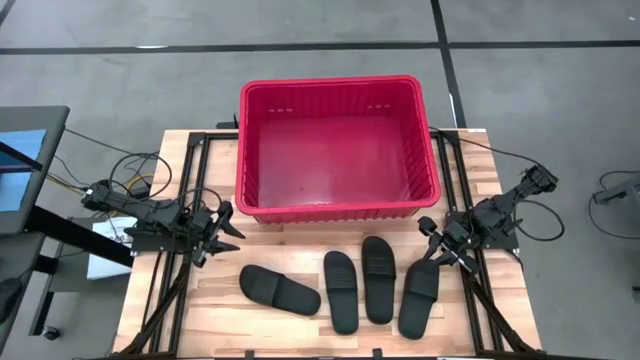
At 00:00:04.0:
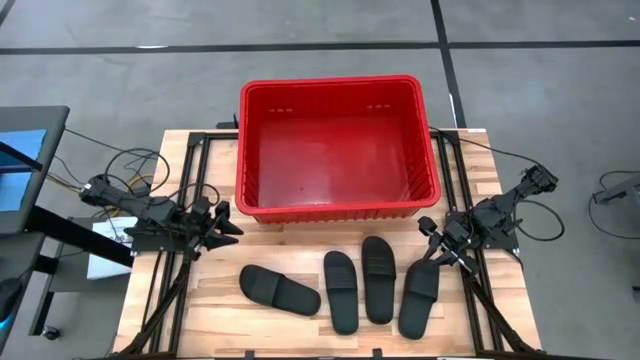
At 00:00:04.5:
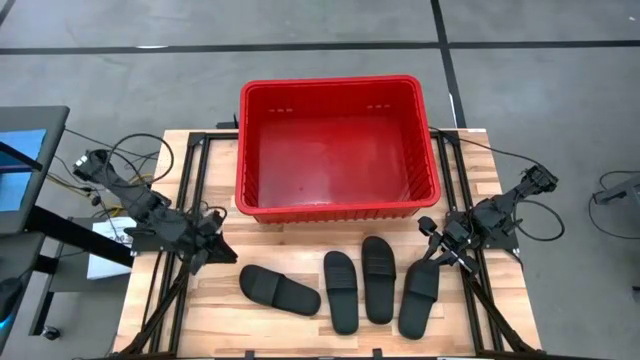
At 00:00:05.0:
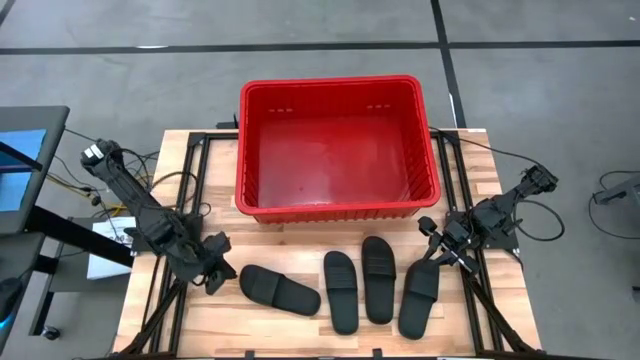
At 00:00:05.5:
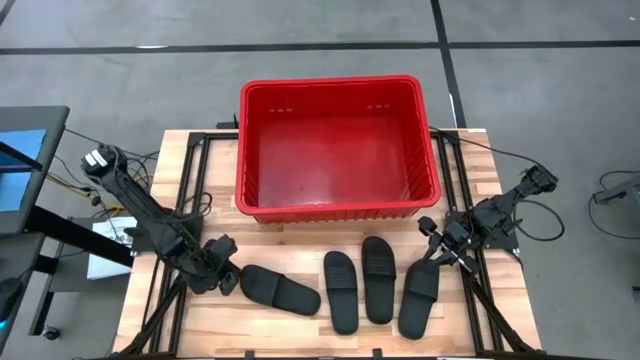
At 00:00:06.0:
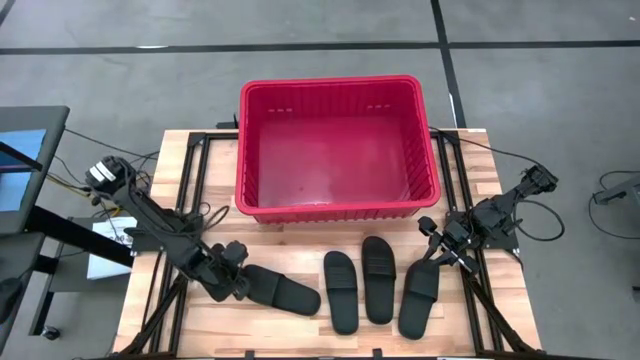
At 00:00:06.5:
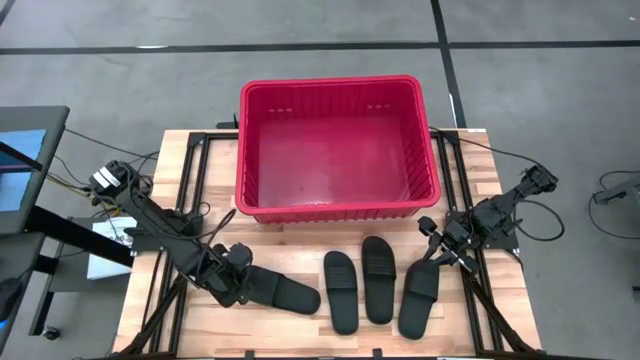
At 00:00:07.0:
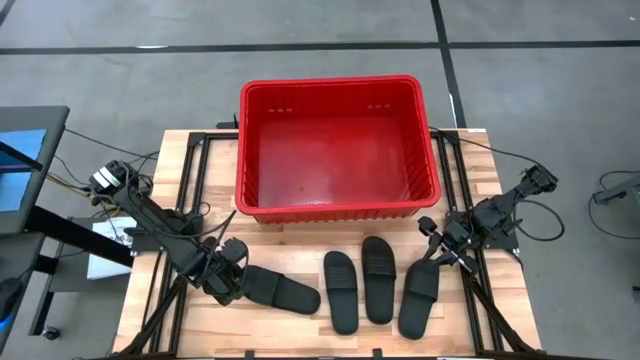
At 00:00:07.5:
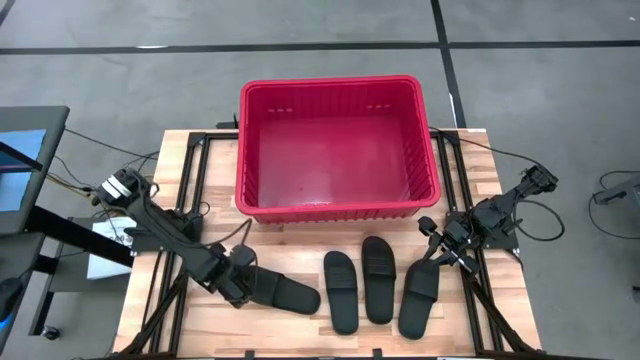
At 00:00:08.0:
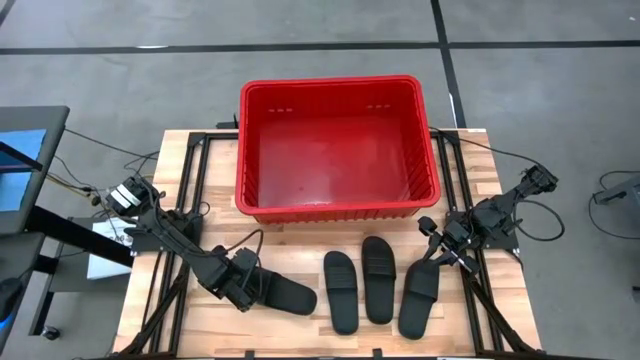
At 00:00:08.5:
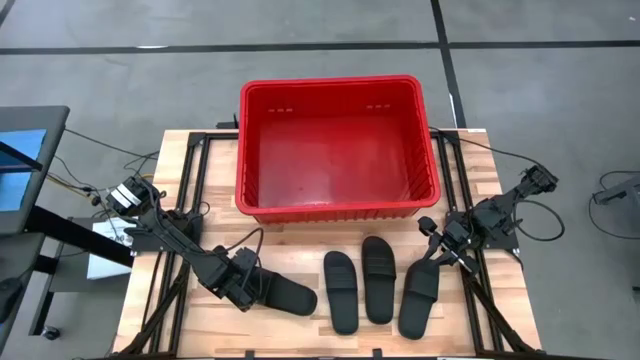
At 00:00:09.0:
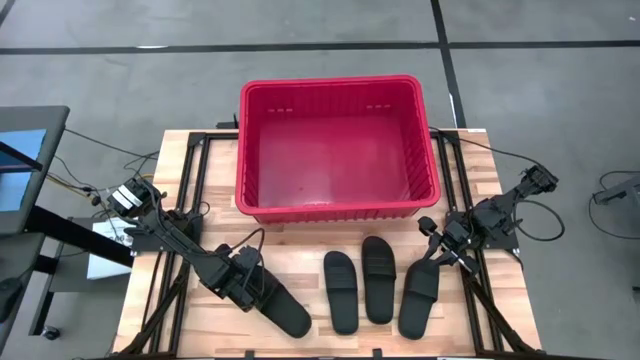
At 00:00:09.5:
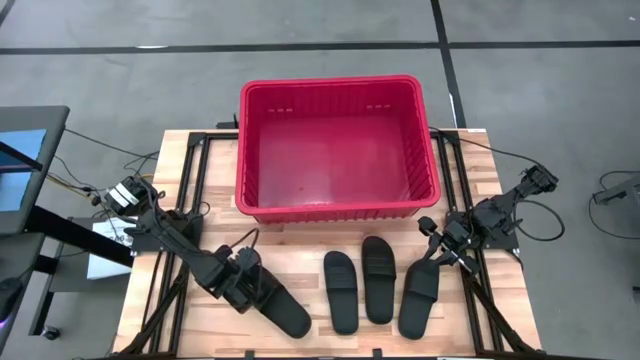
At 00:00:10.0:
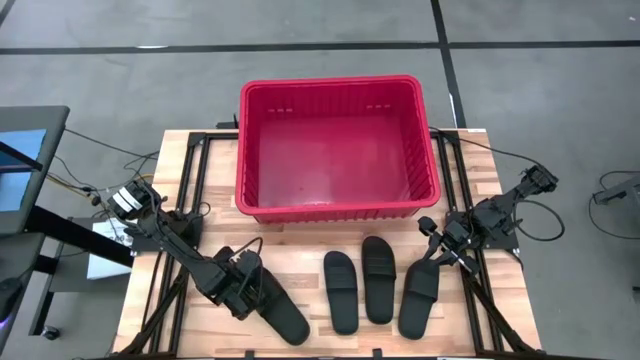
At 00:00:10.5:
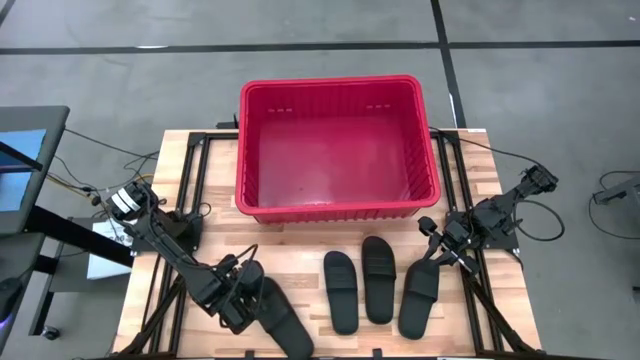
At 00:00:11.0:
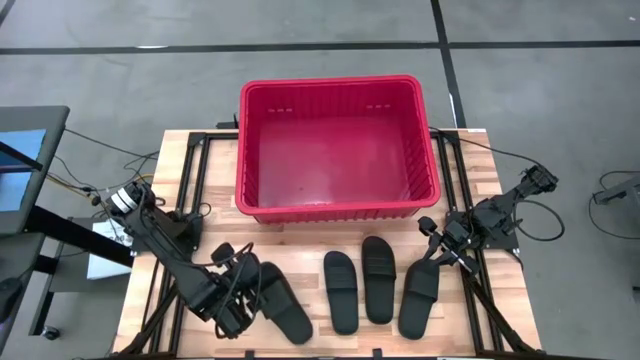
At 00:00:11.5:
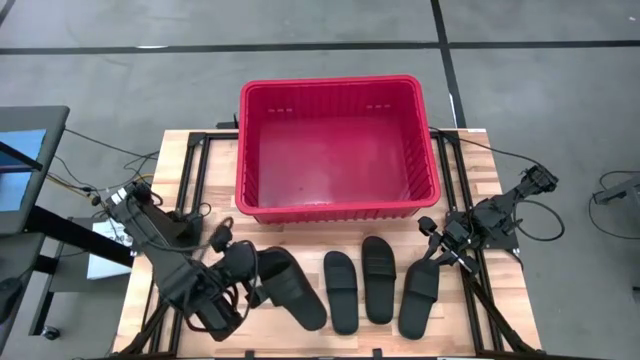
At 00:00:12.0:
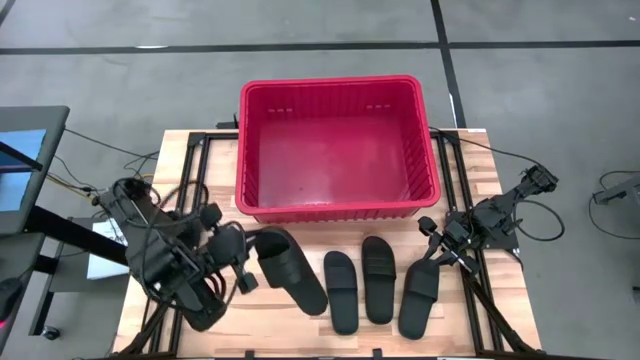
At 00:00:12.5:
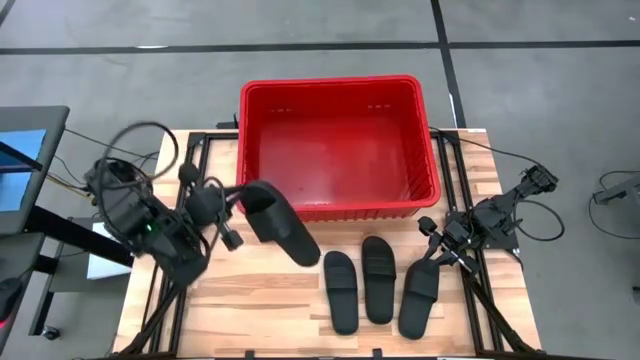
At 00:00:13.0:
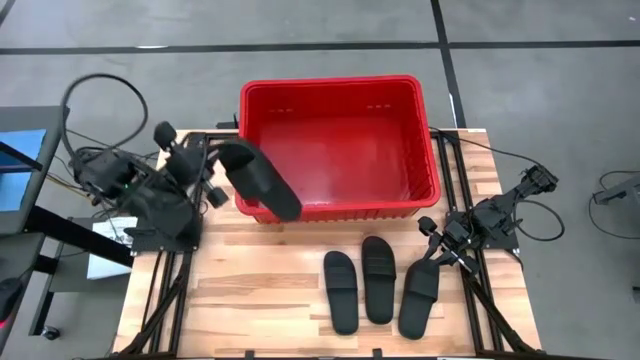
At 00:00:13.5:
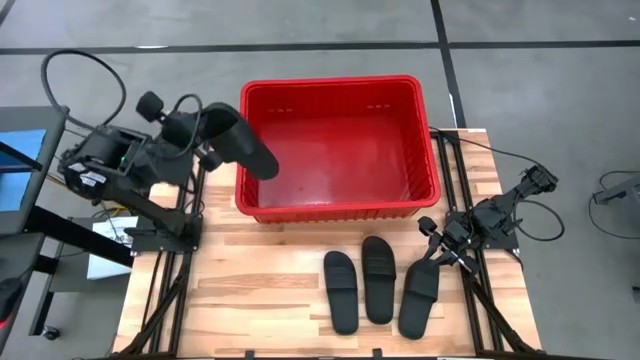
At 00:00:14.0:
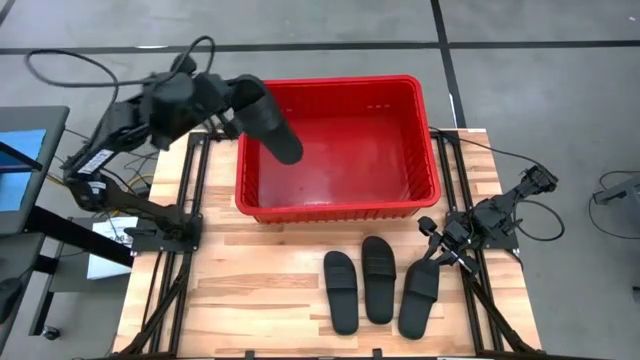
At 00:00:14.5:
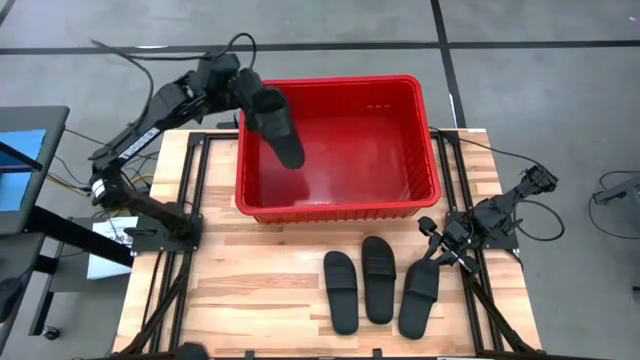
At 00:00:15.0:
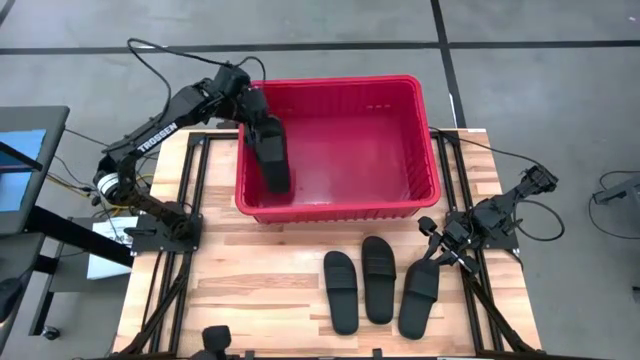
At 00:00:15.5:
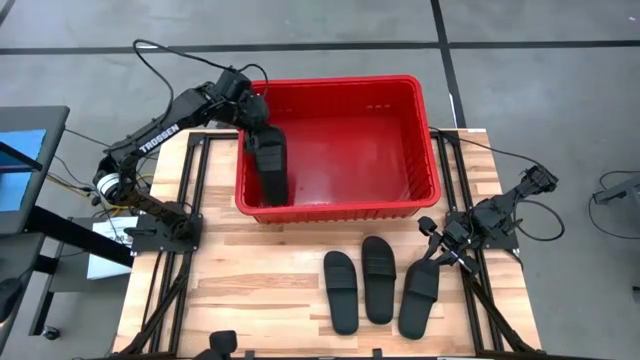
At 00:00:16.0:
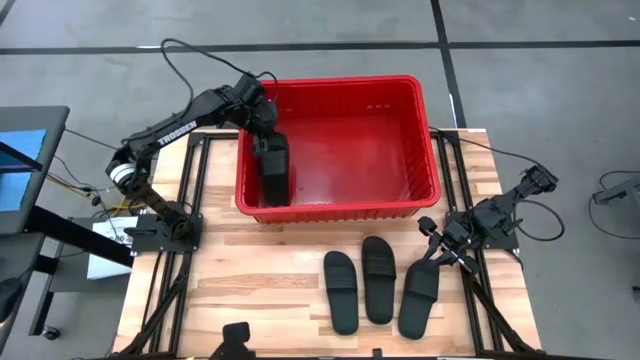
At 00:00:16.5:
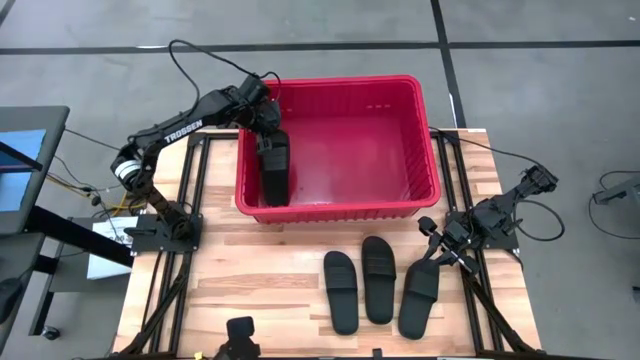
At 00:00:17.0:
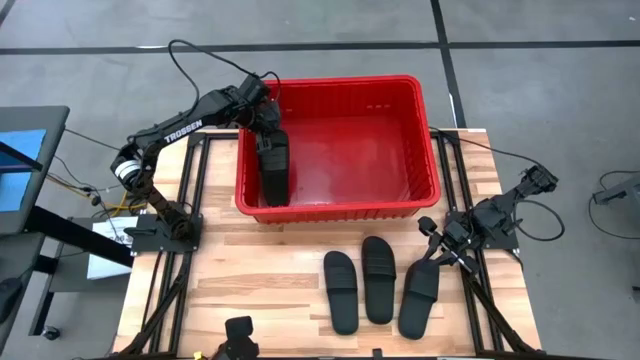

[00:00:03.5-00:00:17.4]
Task: Pick and place slides into bin
Put the black slide into the red container

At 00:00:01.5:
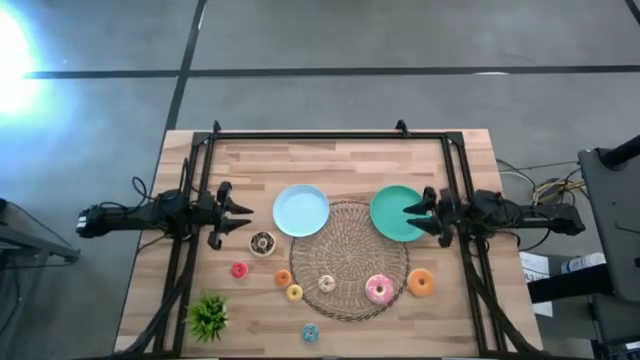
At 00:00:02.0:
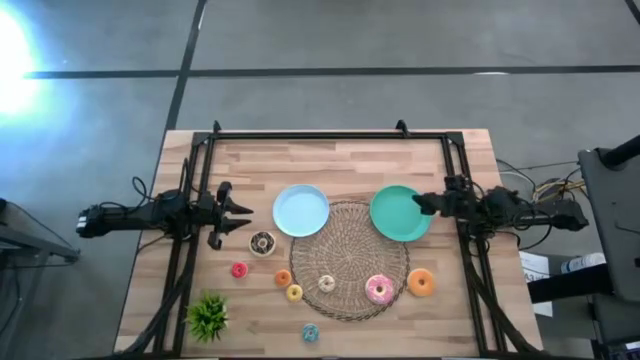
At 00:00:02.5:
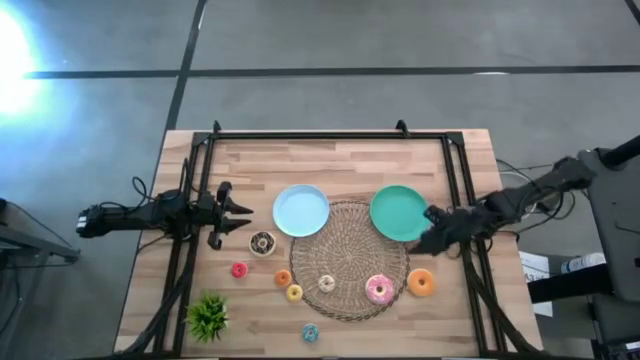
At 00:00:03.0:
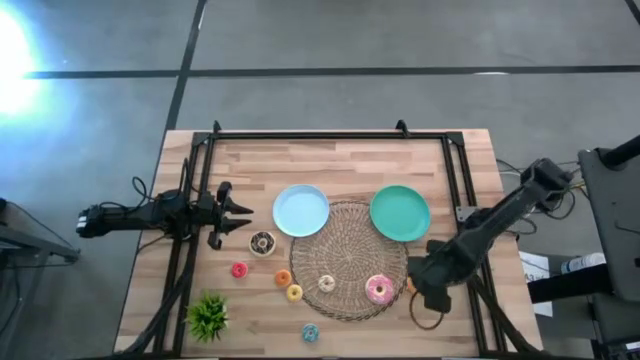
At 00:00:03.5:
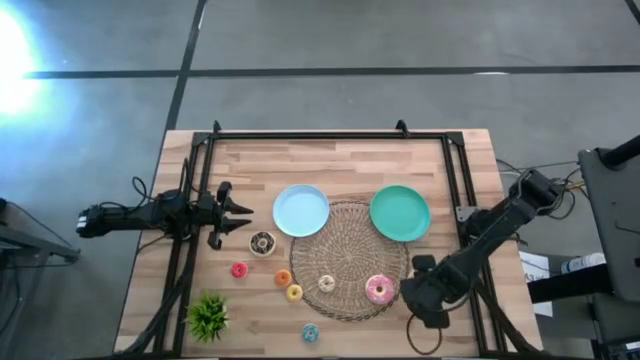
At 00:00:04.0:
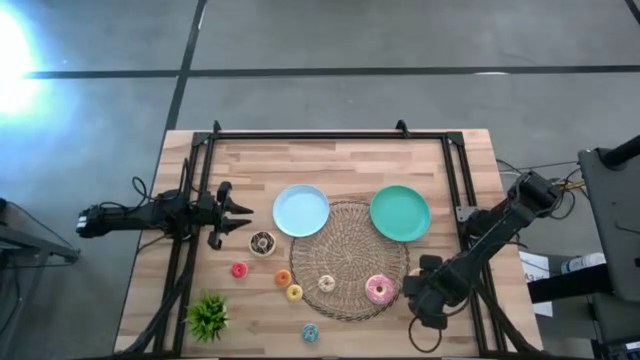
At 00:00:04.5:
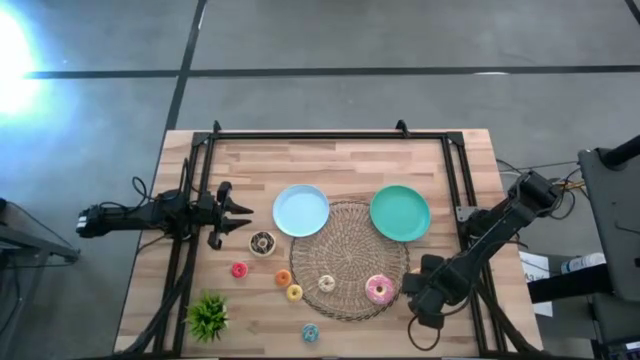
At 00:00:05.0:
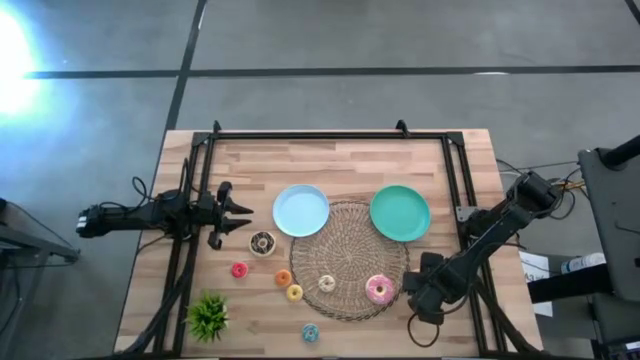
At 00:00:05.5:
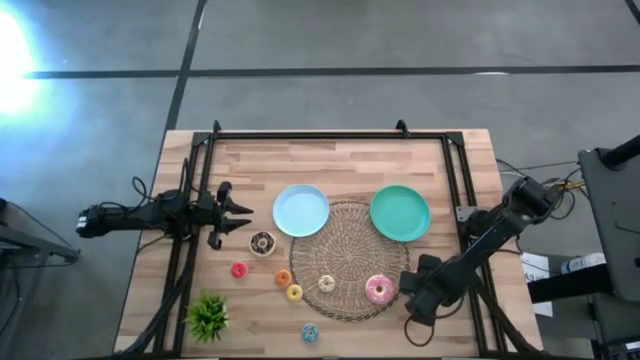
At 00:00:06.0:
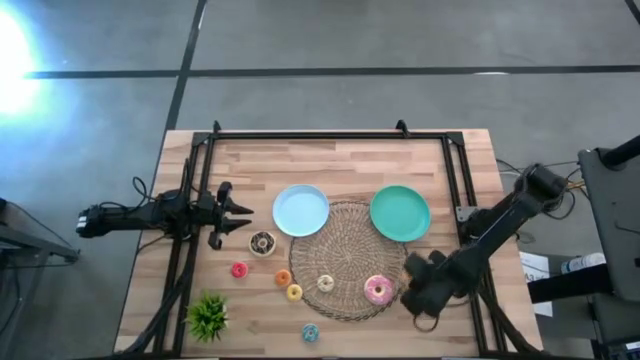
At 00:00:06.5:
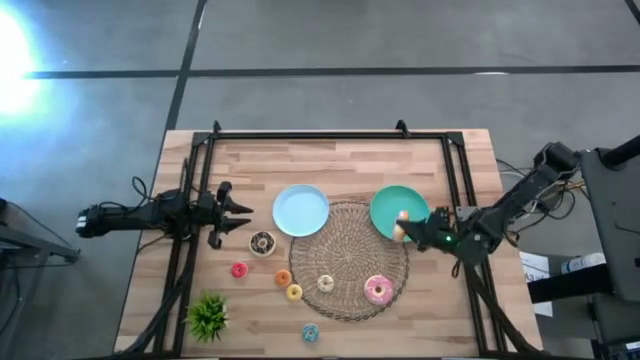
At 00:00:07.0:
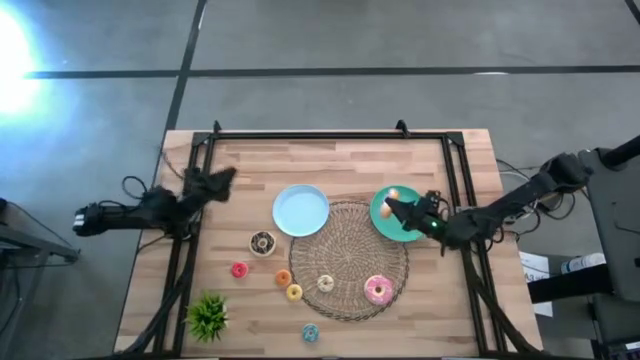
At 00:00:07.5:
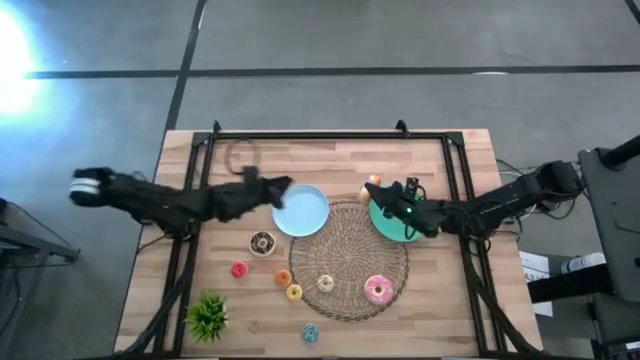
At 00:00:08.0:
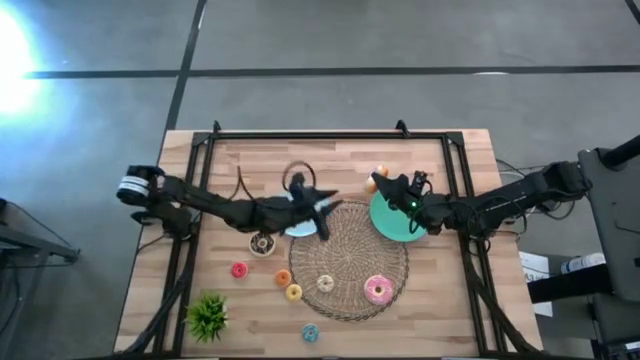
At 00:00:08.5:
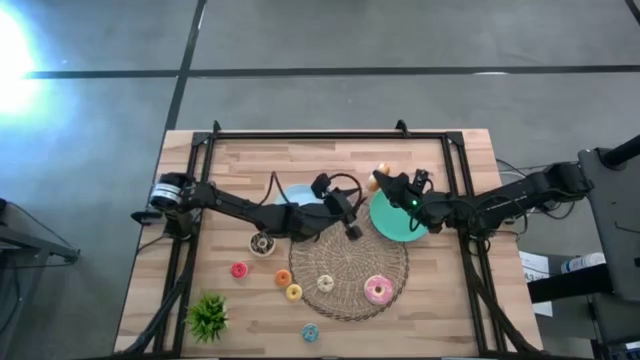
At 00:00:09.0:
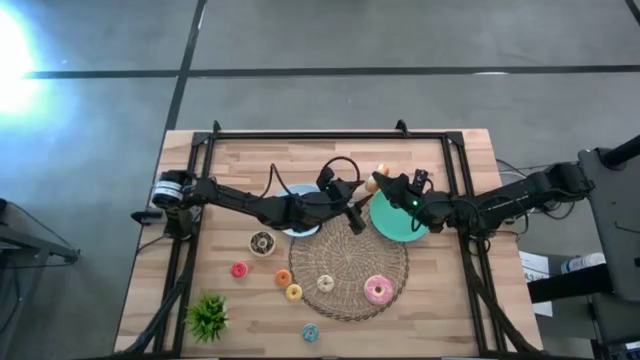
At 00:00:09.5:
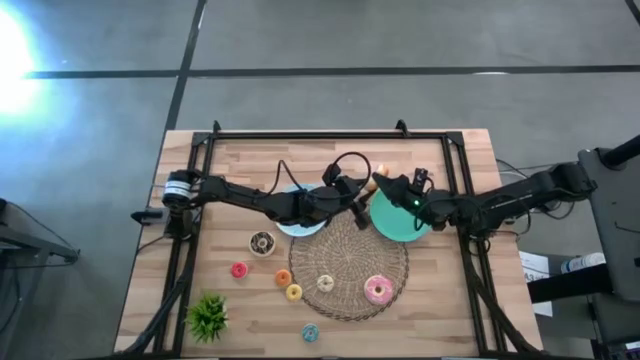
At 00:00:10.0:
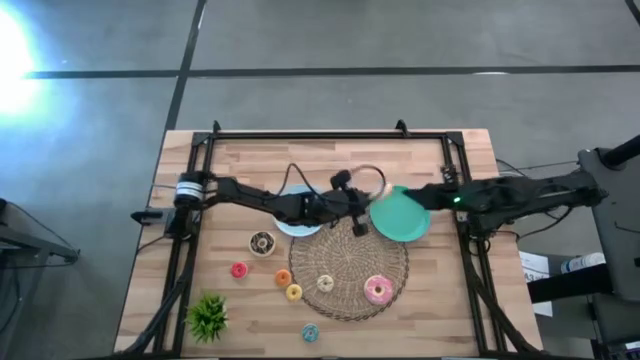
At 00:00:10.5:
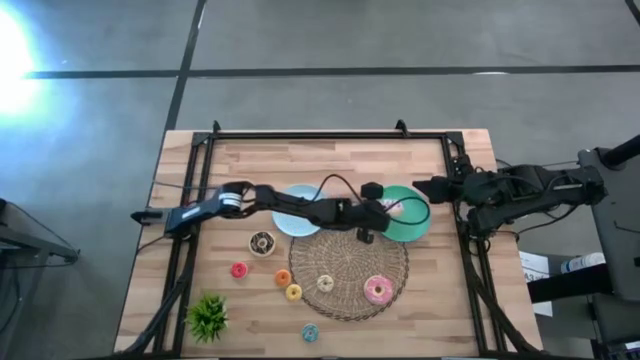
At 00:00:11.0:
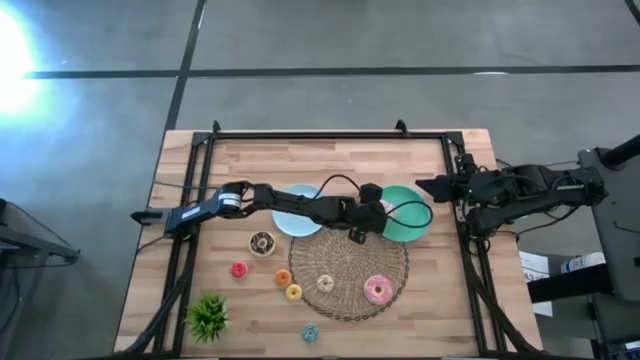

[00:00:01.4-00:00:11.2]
Task: Pick & Place donuts
Put the big orange donut on the green plate
